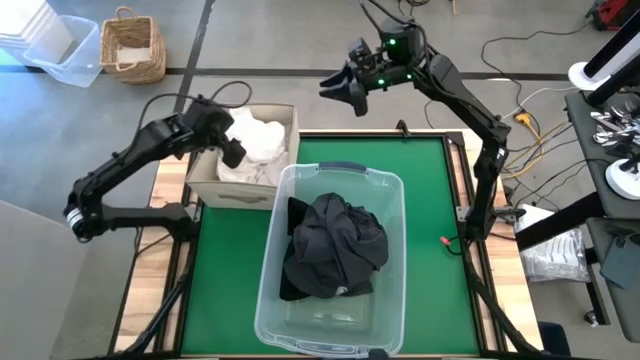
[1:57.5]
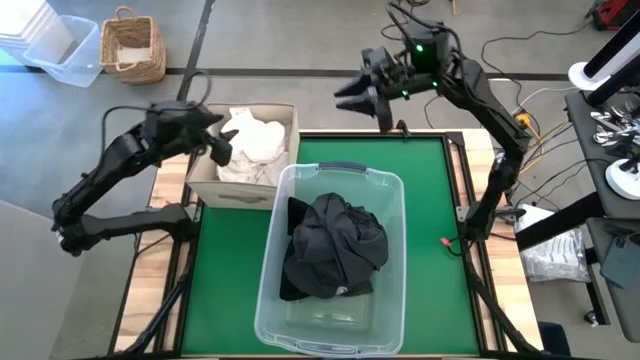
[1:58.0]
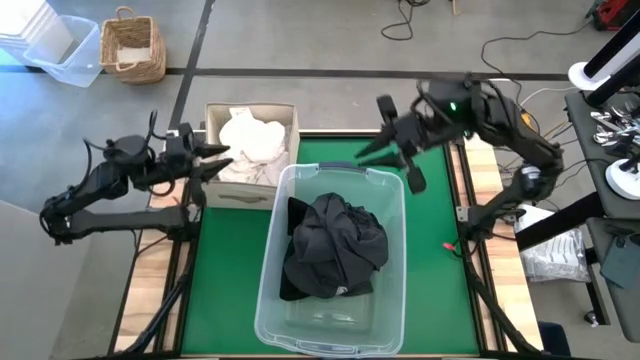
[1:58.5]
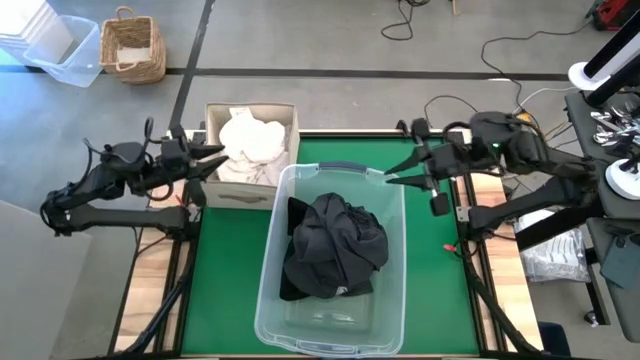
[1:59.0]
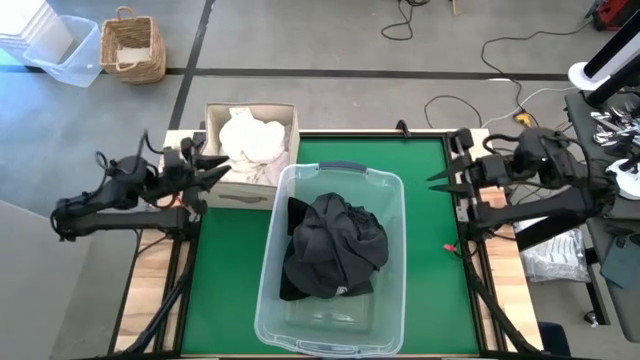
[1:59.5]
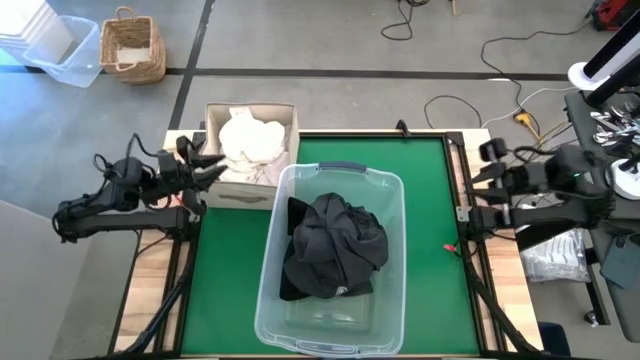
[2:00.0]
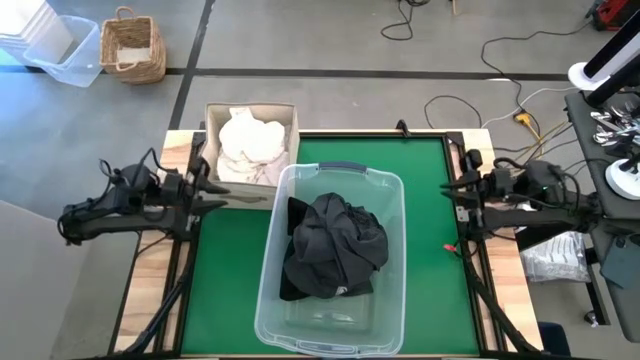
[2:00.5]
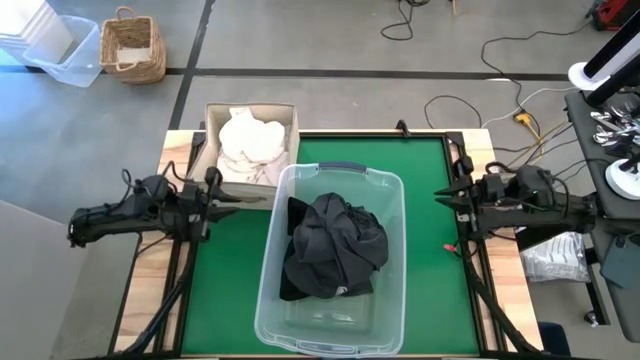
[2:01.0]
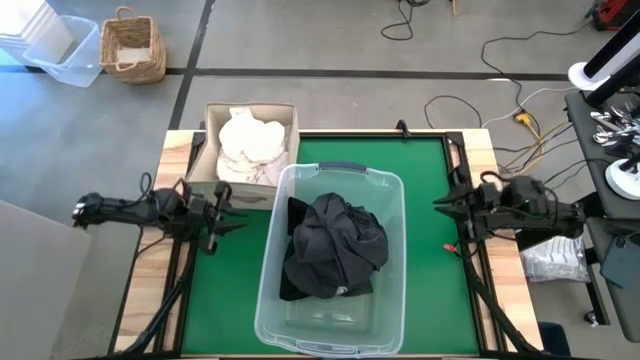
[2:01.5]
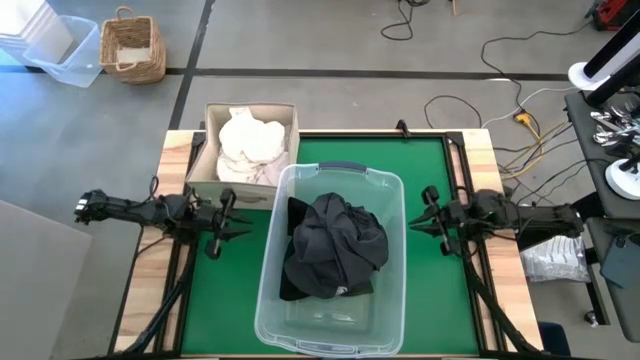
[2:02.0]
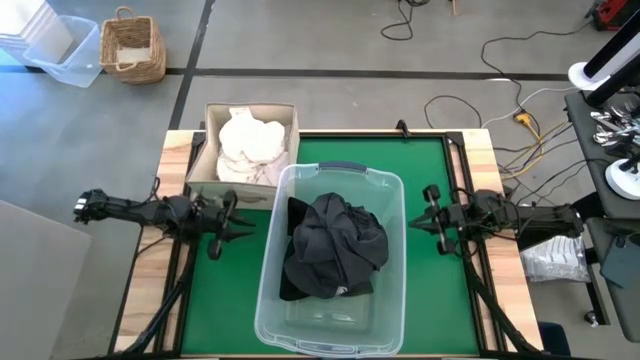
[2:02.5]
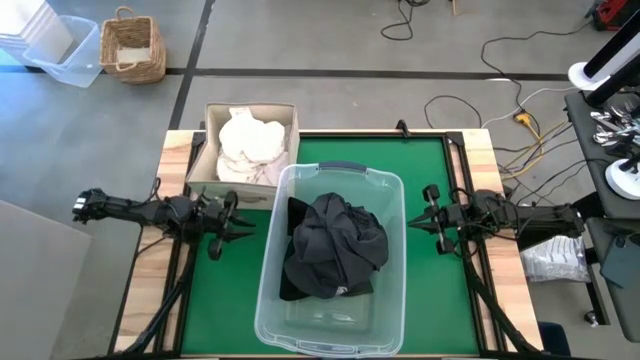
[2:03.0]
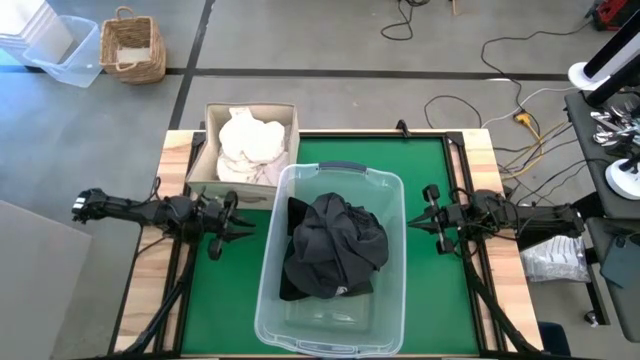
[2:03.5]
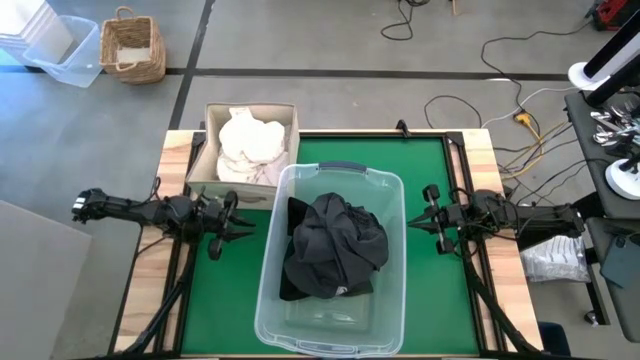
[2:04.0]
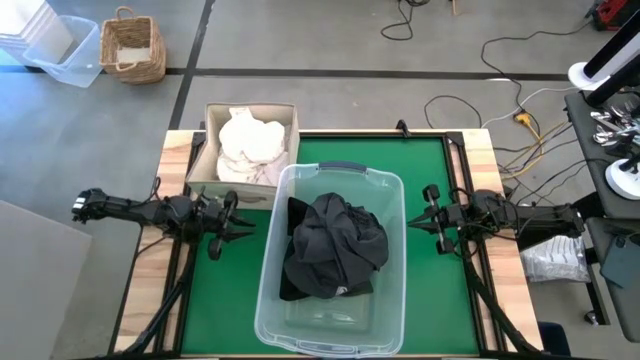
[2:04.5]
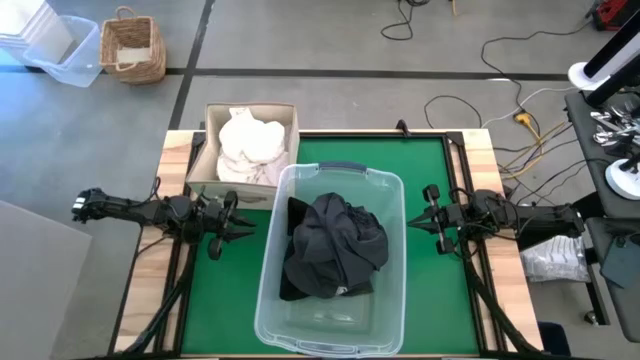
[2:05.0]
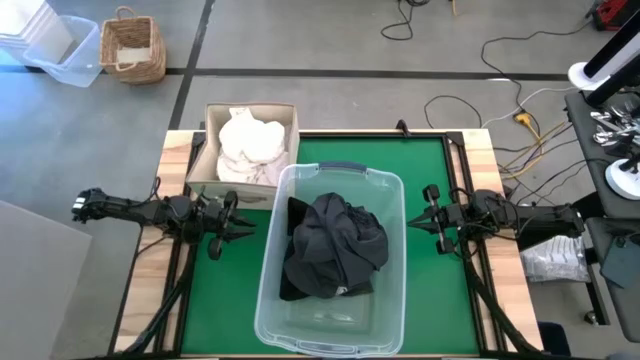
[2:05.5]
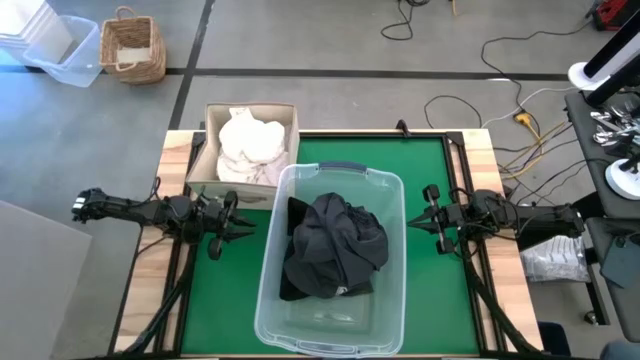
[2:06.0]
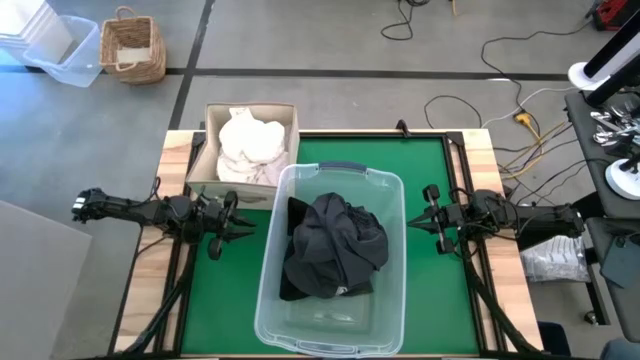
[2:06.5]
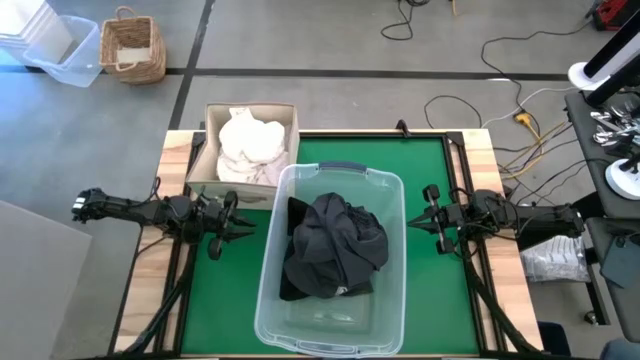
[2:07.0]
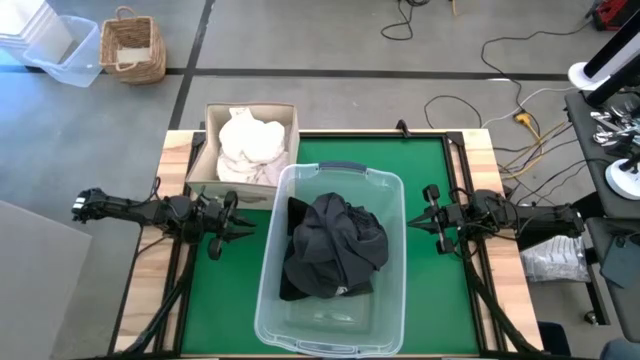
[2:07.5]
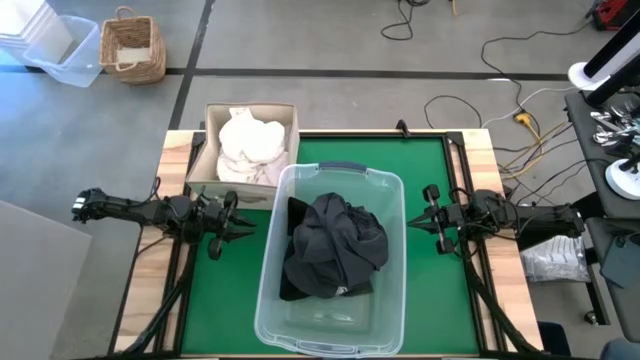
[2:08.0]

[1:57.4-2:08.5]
Return to Home Position

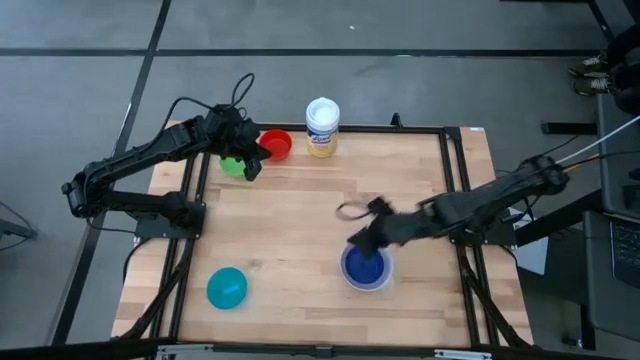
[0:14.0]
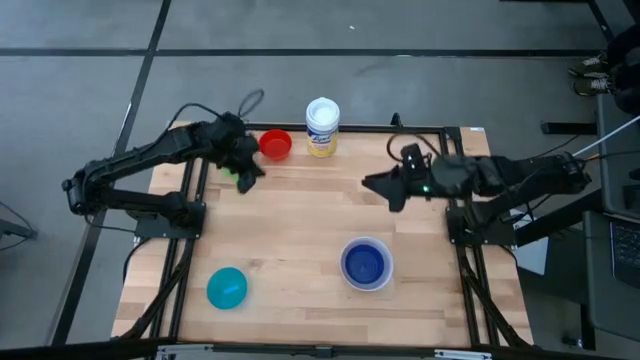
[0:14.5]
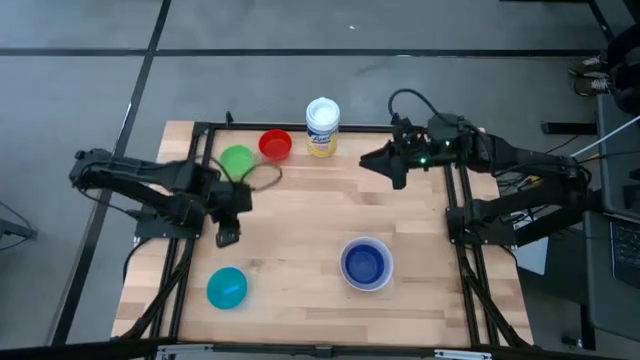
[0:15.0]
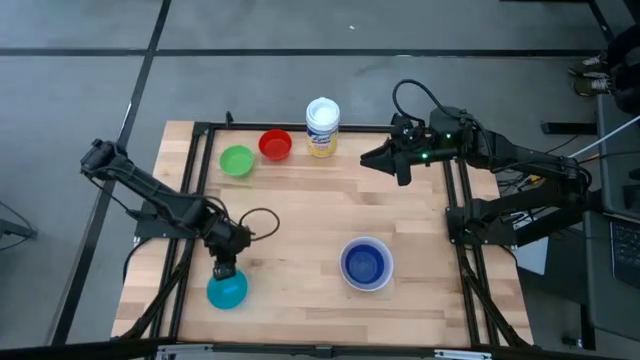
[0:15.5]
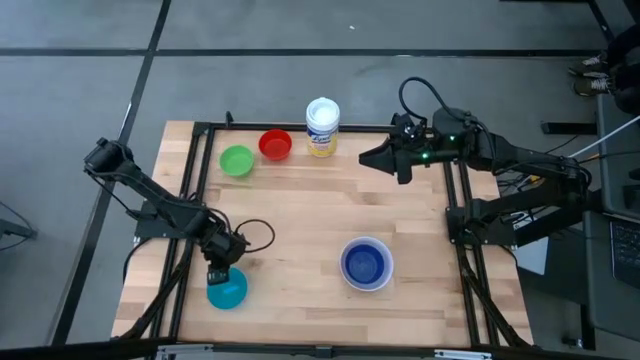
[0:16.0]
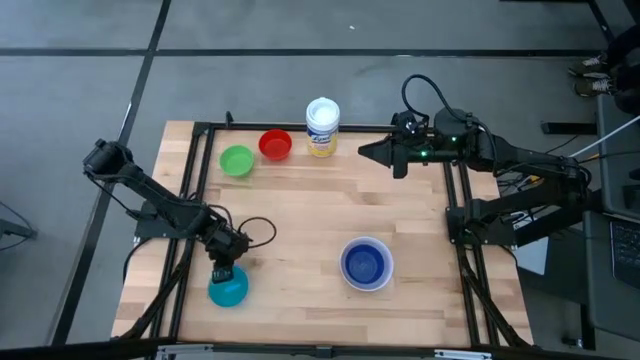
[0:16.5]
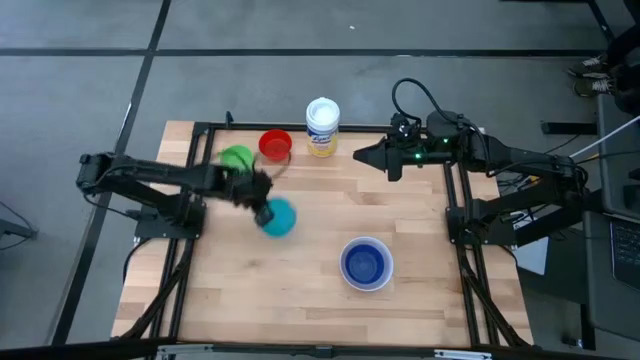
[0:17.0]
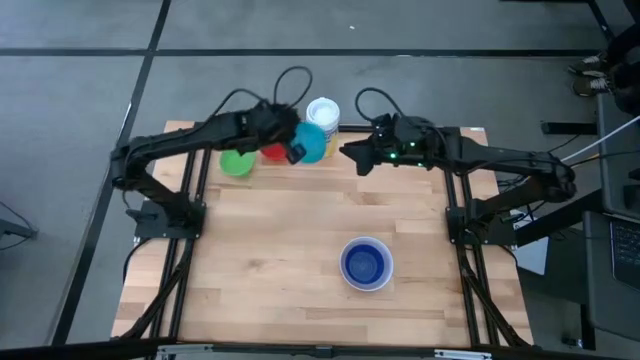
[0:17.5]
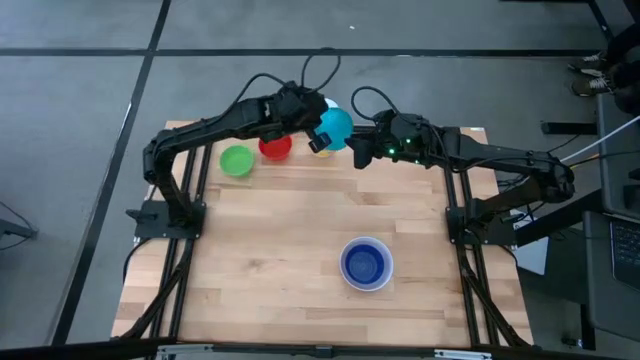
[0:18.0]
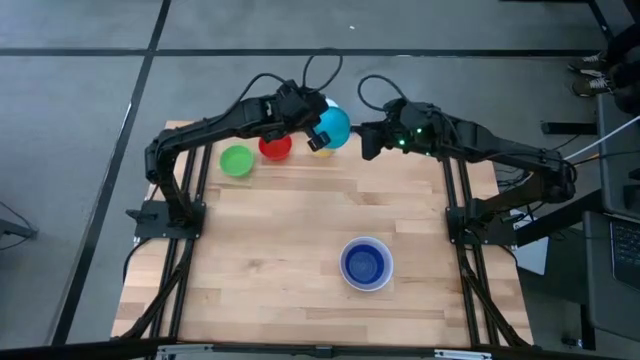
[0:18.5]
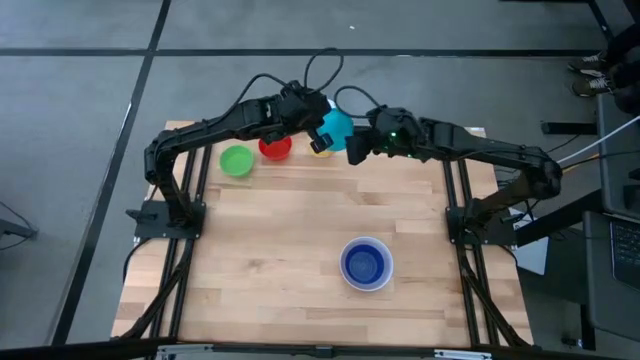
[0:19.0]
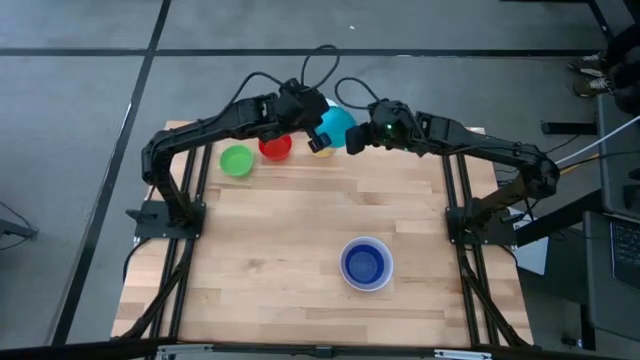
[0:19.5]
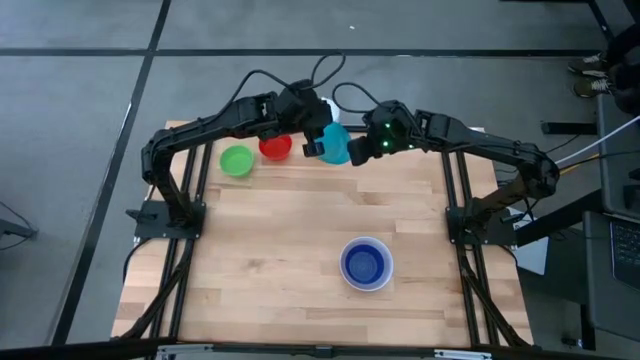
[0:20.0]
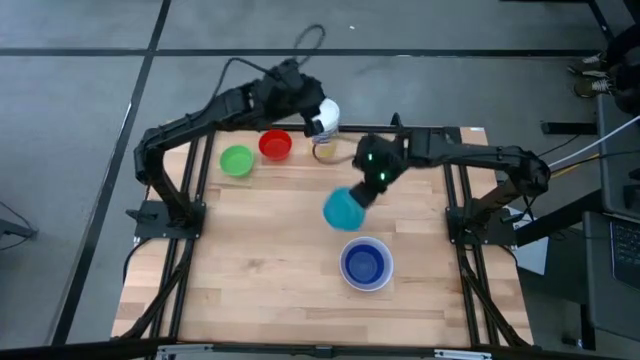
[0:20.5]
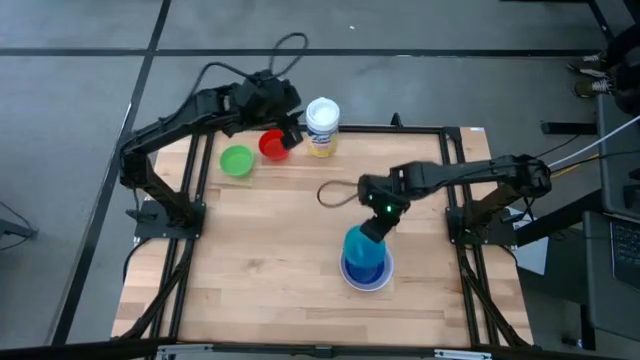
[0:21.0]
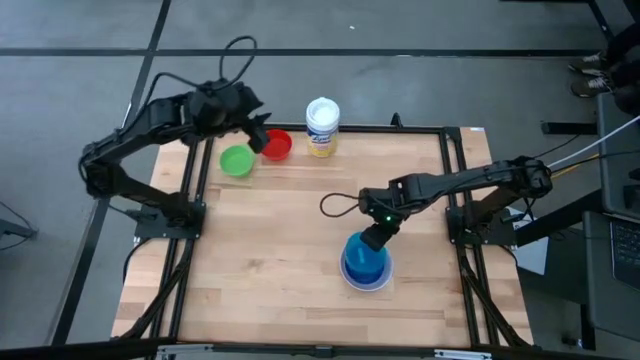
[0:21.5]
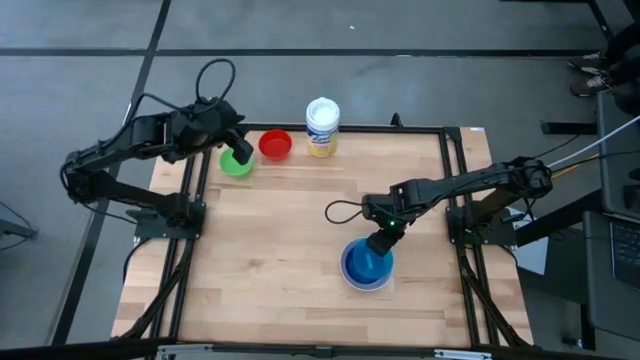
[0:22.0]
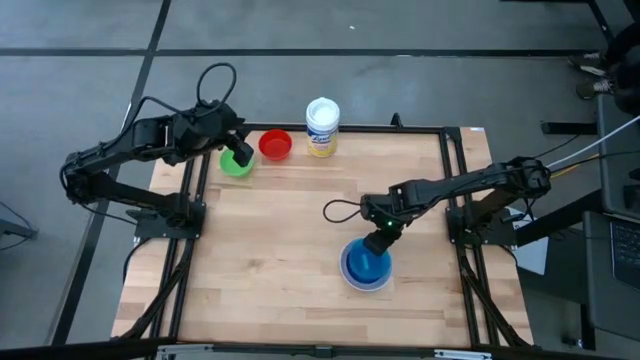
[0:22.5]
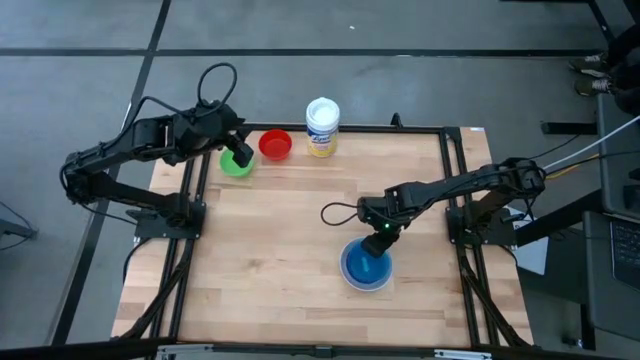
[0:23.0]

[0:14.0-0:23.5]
Stack the light blue bowl on top of the stacked bowls
